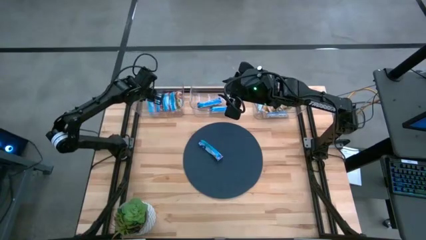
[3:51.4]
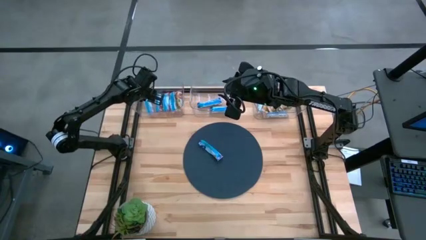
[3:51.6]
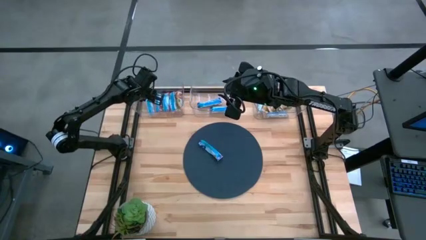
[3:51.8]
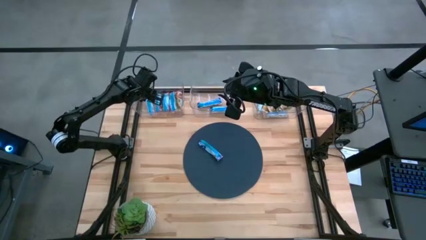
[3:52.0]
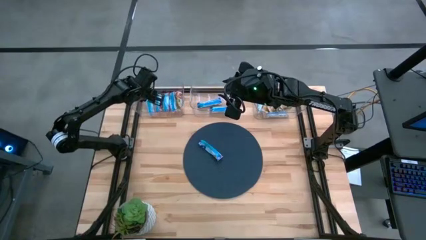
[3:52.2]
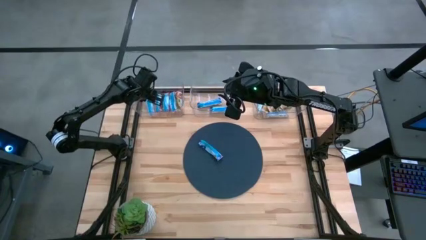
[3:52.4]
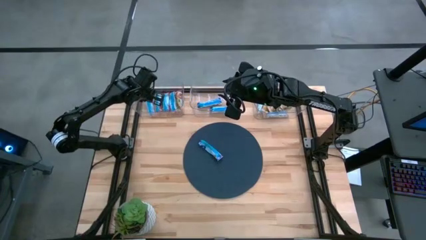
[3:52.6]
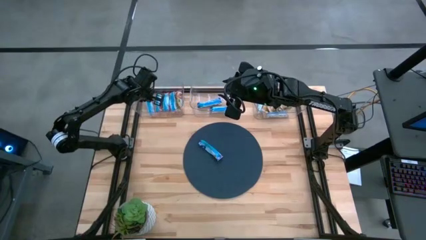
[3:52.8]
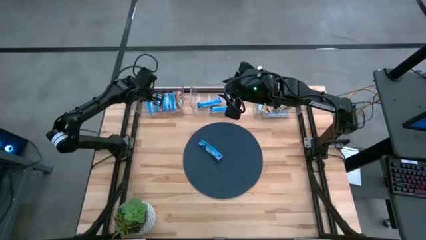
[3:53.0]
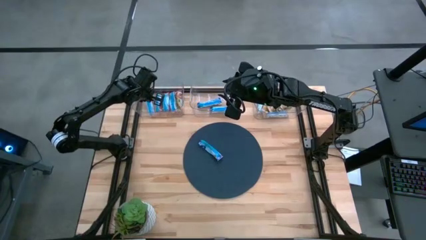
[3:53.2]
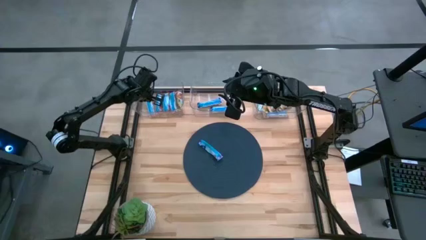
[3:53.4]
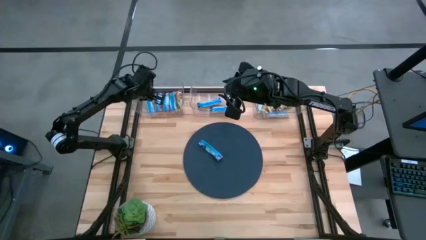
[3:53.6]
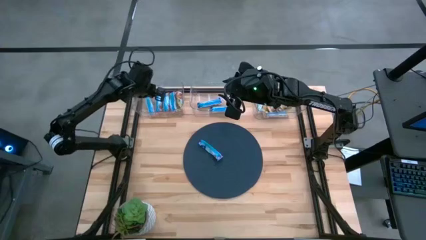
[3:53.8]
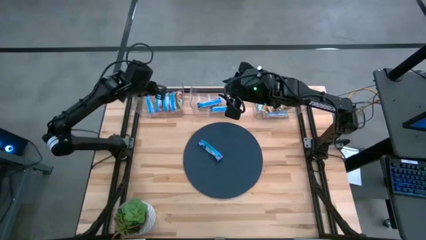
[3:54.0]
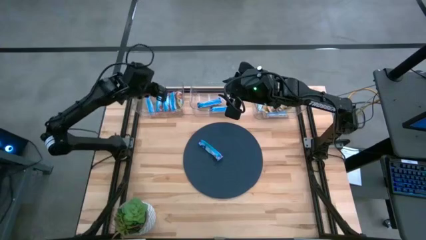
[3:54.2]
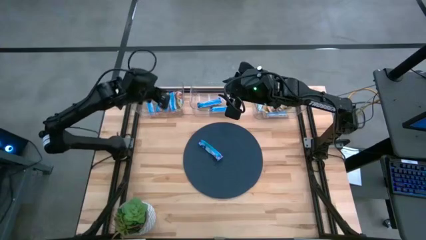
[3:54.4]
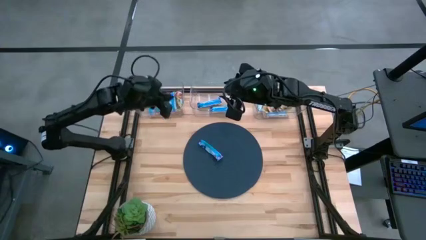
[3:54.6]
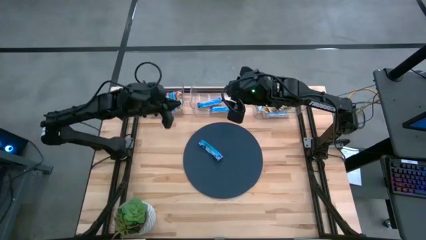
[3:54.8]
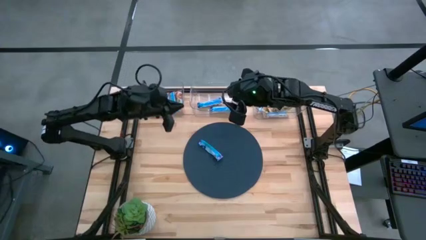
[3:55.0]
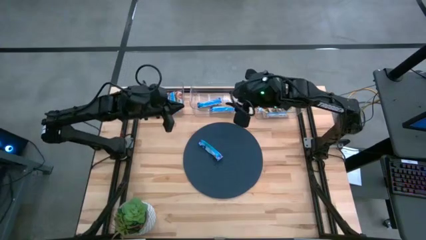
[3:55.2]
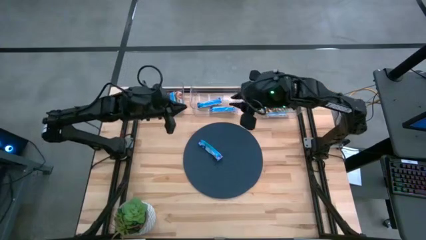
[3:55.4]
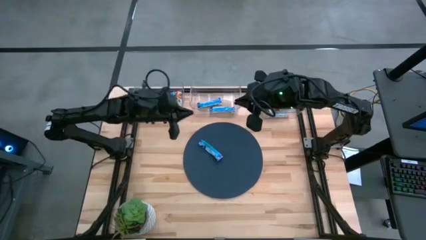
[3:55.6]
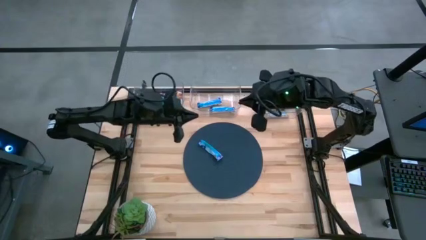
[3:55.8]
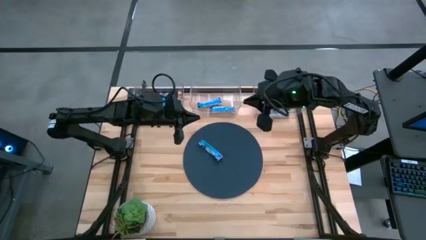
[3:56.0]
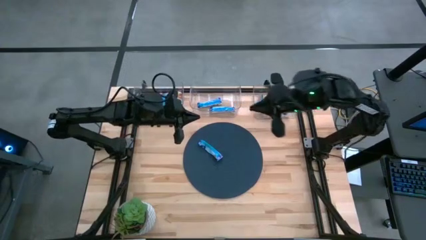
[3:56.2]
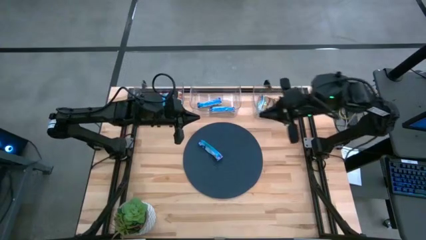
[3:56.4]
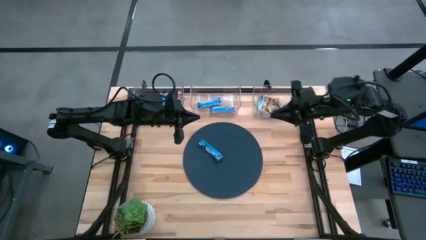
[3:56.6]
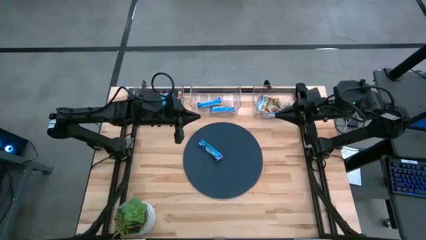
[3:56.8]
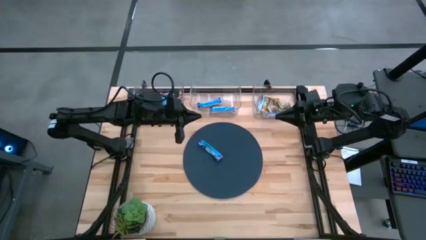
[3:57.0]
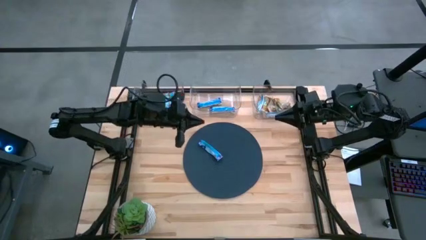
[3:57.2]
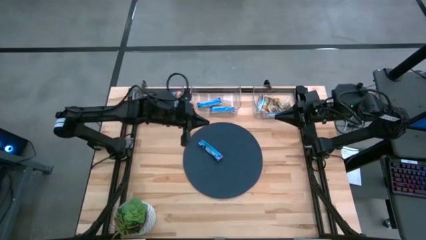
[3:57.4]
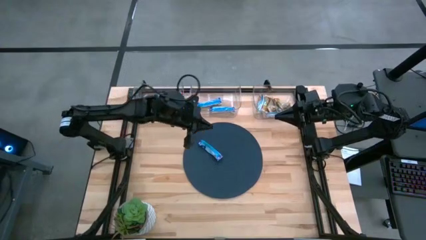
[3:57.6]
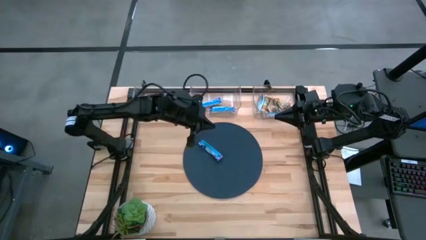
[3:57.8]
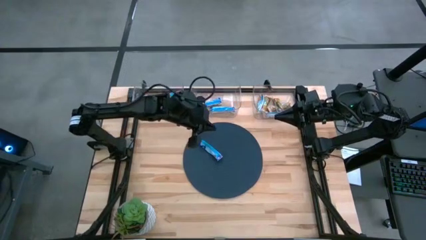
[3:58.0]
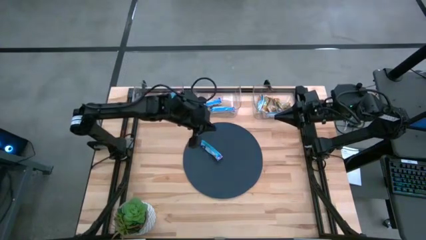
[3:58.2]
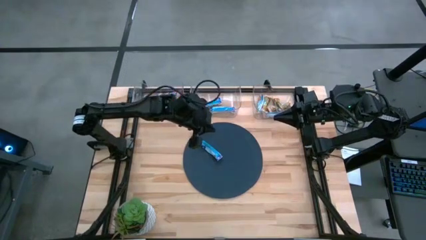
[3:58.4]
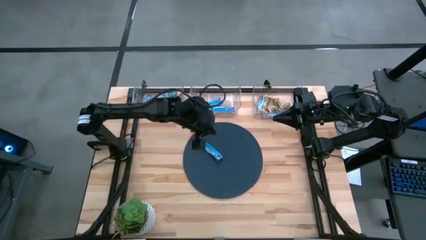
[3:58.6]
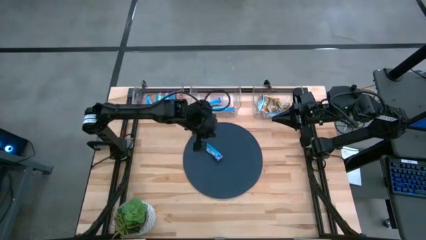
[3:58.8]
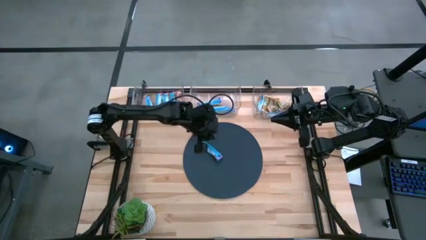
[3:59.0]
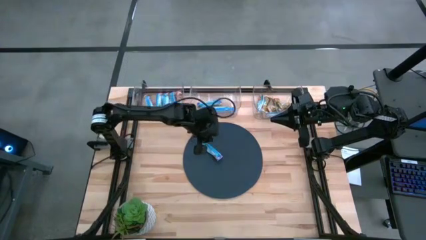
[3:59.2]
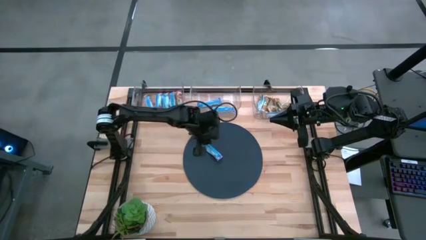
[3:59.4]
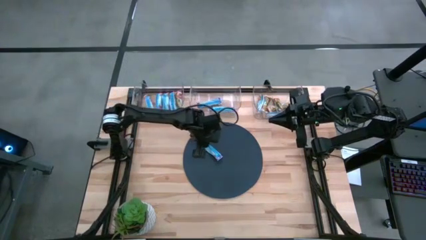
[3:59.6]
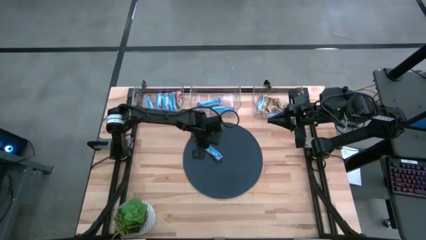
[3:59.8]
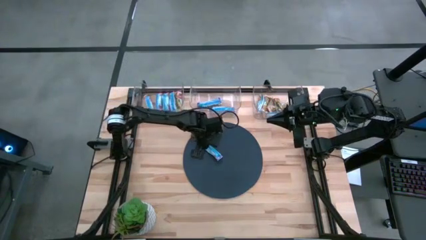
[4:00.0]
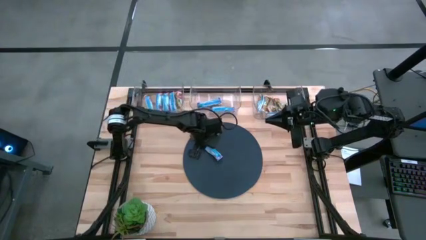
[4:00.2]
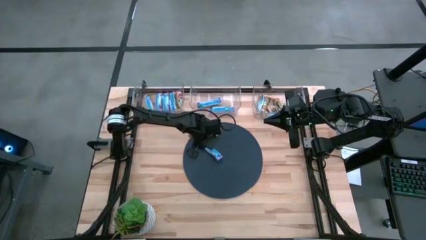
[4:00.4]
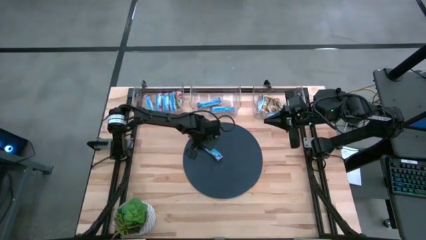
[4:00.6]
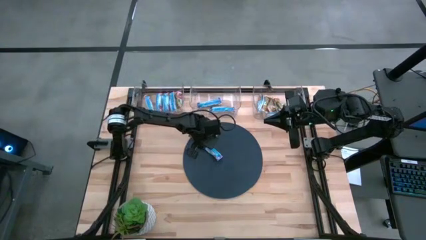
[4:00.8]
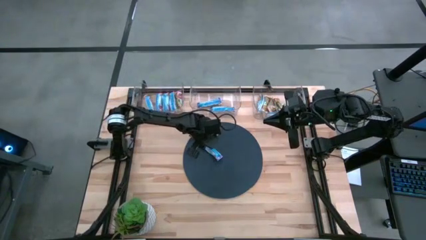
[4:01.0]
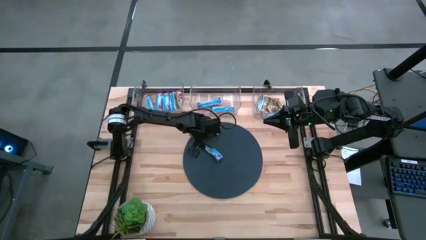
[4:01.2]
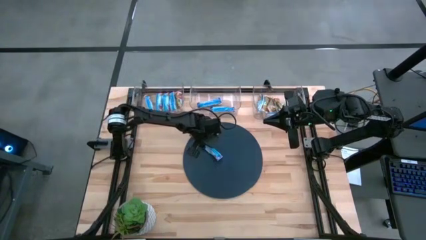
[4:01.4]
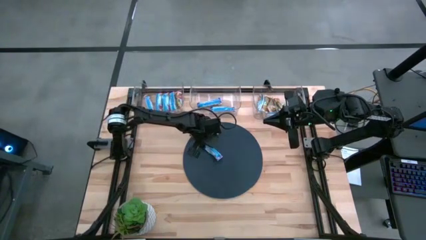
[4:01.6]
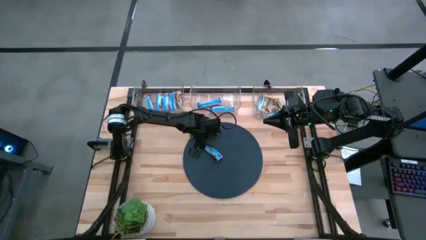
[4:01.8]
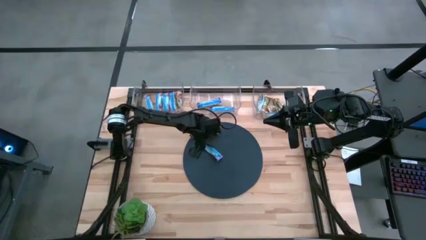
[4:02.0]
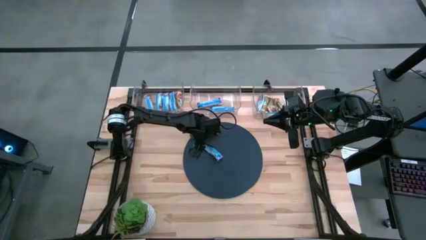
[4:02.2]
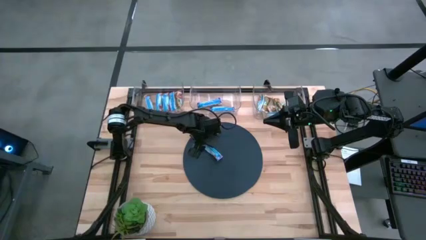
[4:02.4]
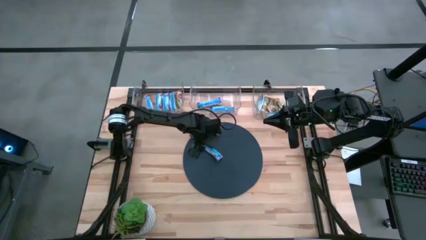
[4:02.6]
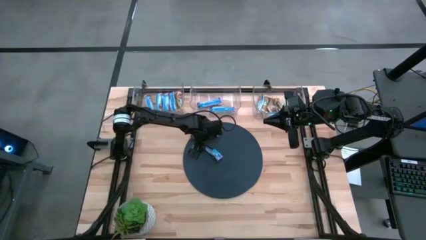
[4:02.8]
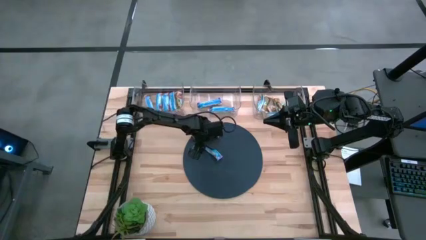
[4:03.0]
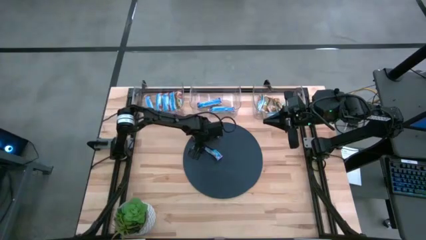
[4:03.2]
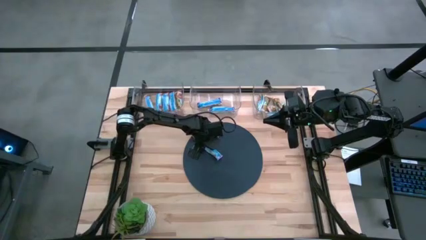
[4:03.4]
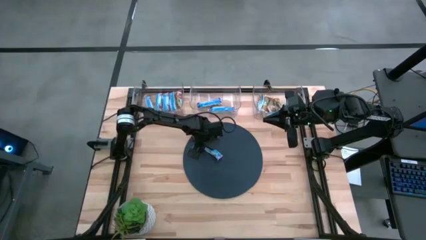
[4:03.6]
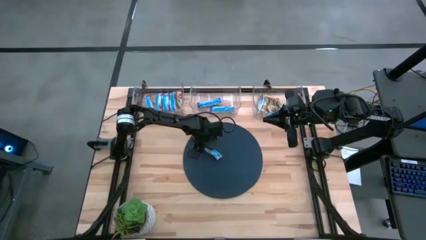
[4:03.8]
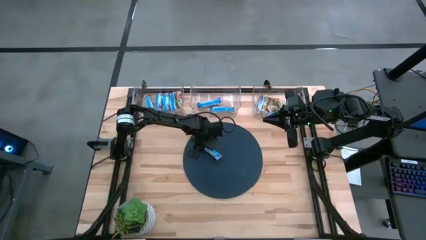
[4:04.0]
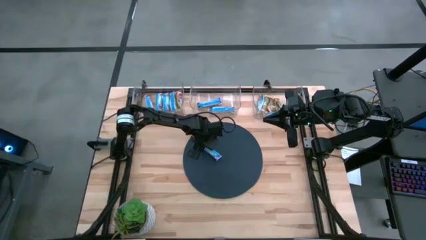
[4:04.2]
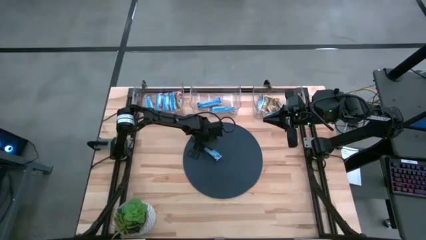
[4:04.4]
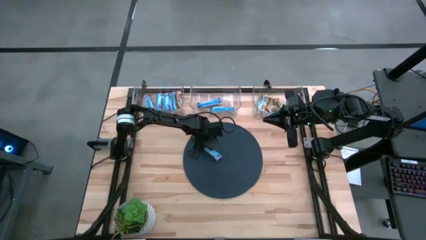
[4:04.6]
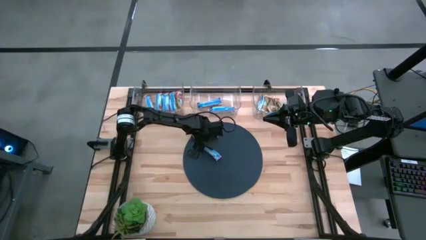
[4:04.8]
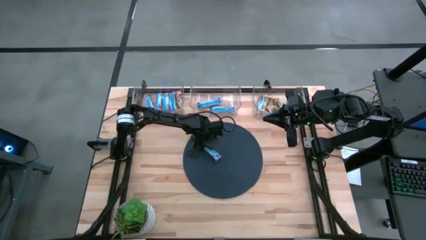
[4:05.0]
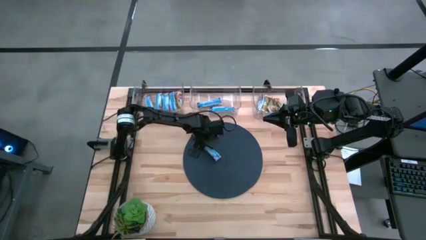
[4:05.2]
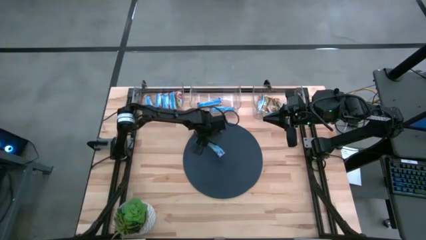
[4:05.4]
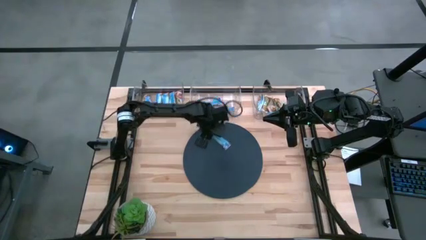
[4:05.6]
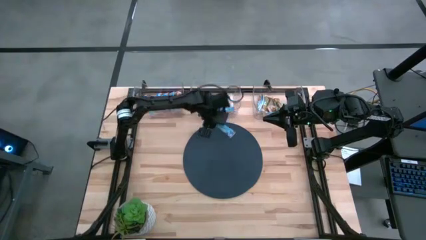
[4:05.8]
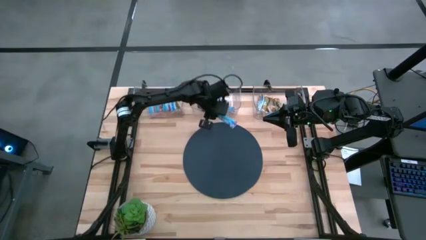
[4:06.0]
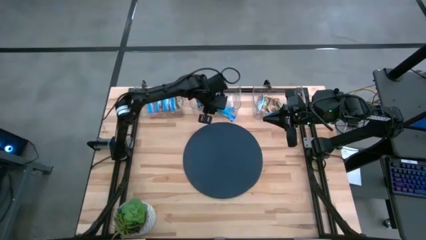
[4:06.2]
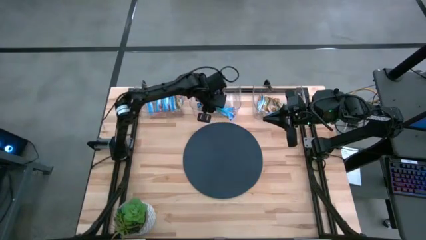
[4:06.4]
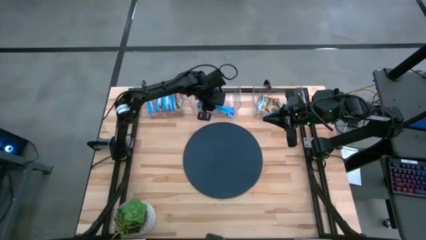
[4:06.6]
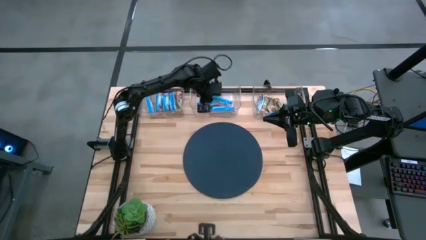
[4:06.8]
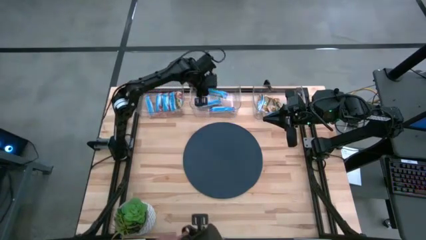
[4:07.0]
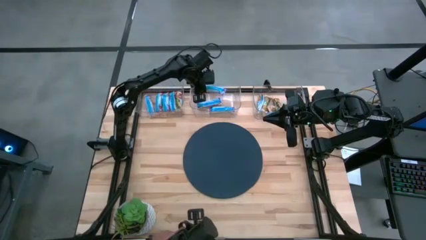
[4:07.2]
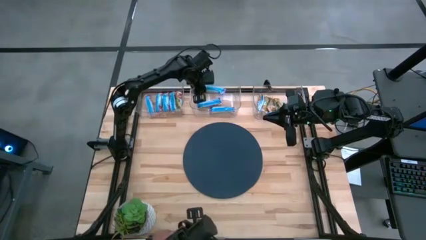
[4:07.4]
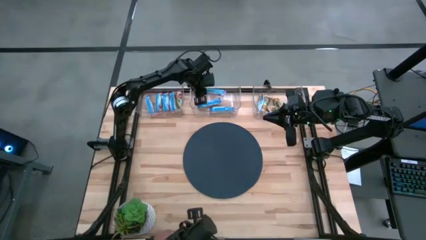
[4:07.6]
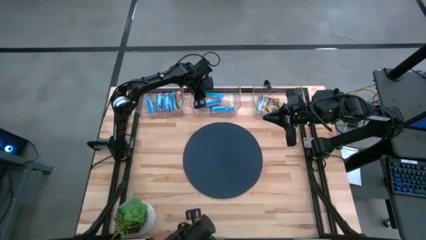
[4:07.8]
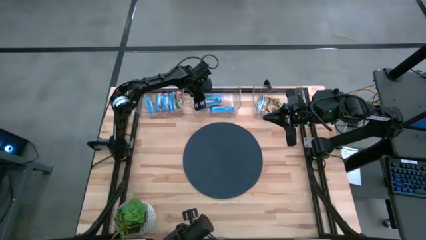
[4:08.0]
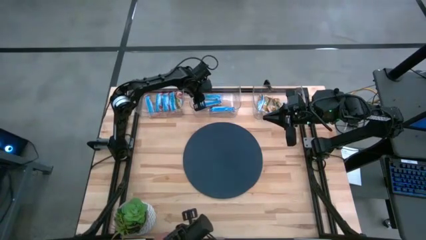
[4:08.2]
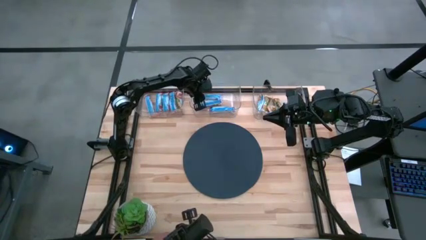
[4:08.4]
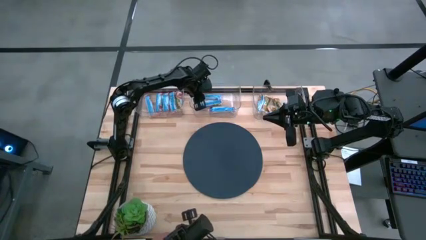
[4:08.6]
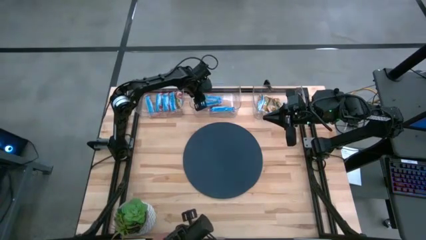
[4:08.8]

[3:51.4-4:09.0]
Task: Pick and place Granola Bars by type
Put the blue granola bar into the middle transparent bin
